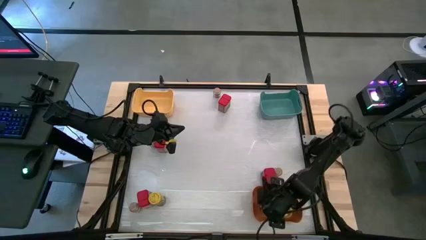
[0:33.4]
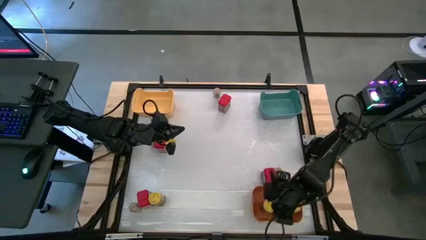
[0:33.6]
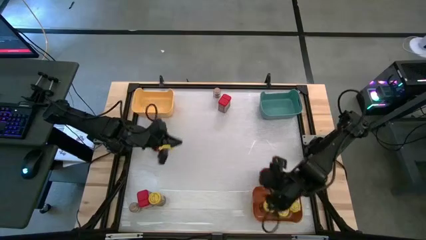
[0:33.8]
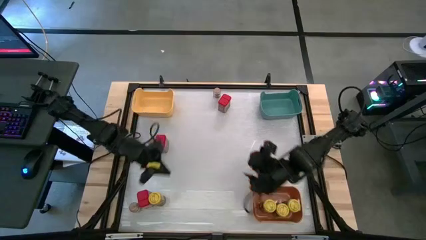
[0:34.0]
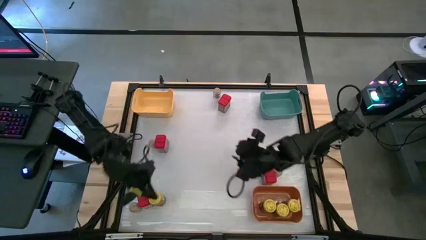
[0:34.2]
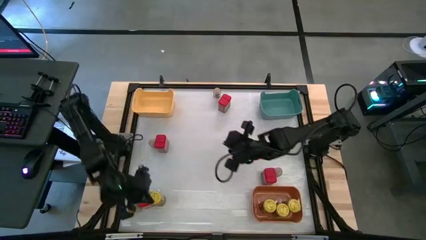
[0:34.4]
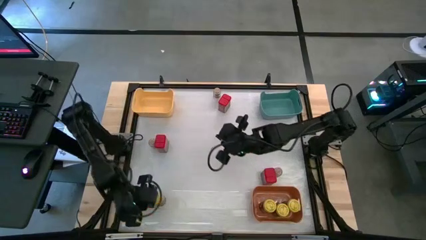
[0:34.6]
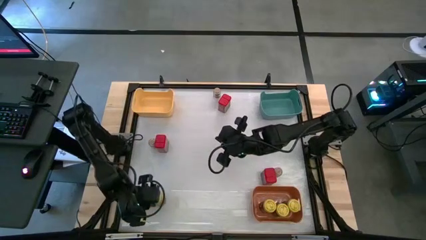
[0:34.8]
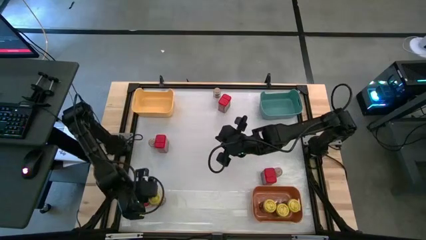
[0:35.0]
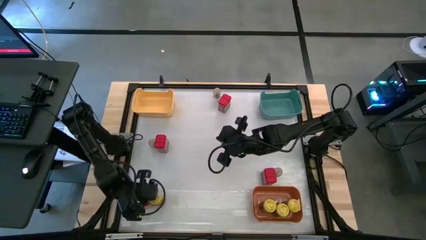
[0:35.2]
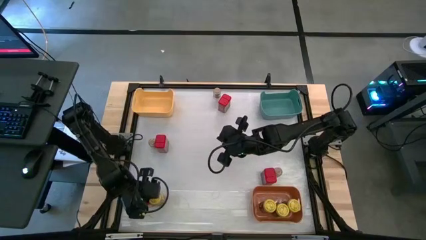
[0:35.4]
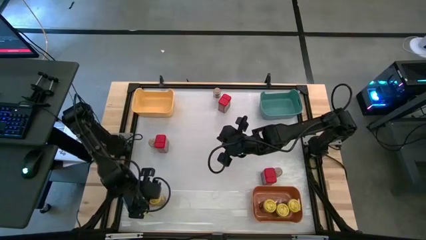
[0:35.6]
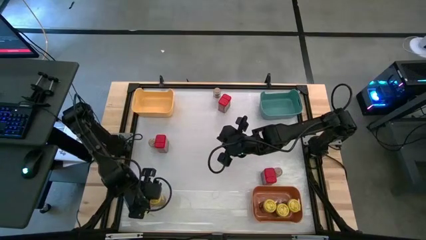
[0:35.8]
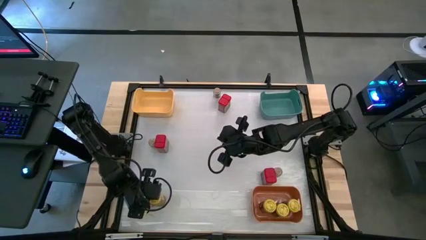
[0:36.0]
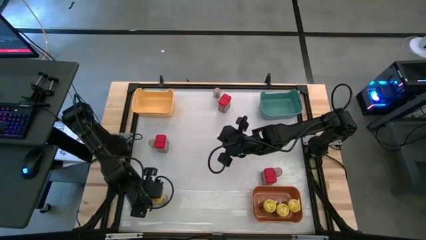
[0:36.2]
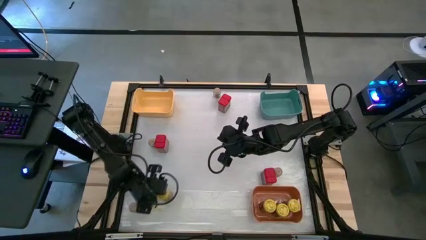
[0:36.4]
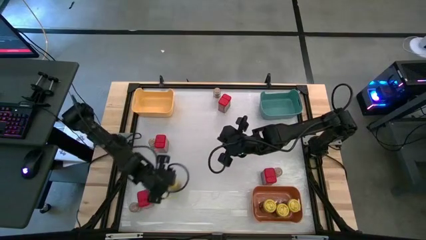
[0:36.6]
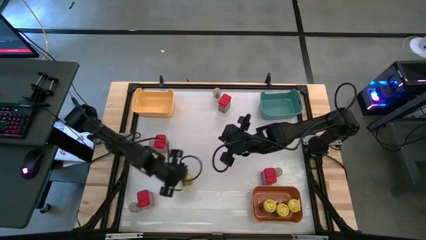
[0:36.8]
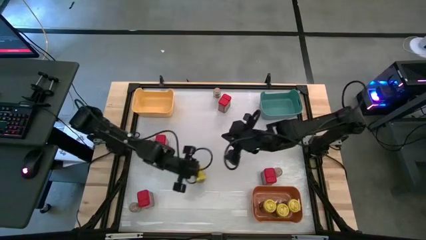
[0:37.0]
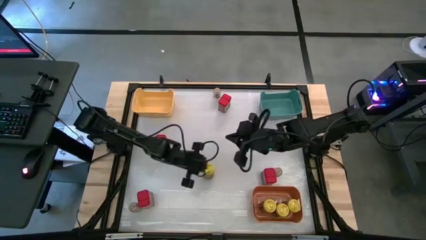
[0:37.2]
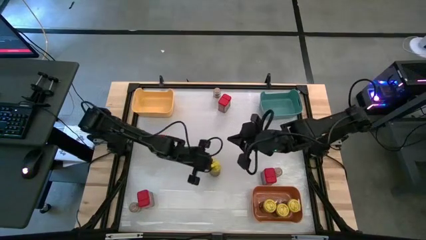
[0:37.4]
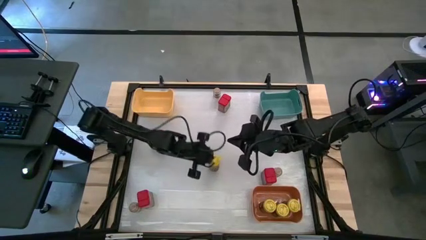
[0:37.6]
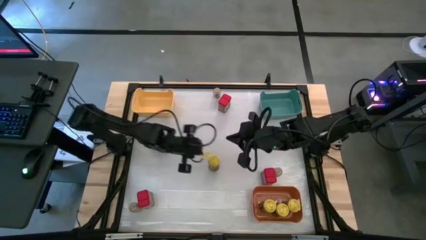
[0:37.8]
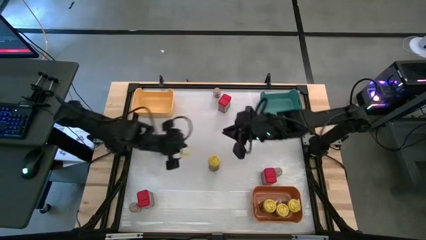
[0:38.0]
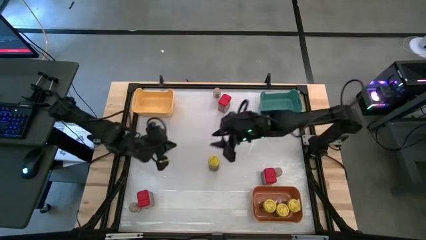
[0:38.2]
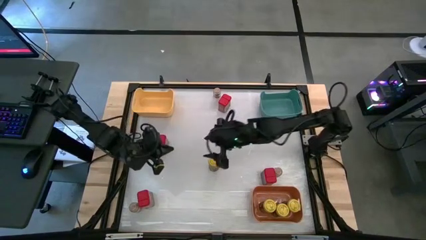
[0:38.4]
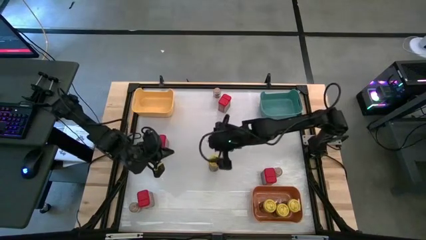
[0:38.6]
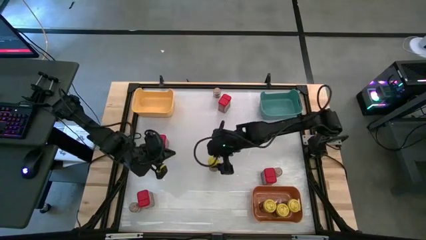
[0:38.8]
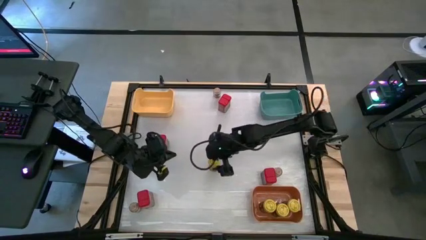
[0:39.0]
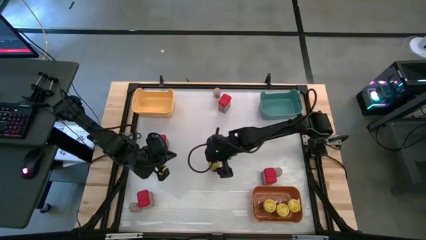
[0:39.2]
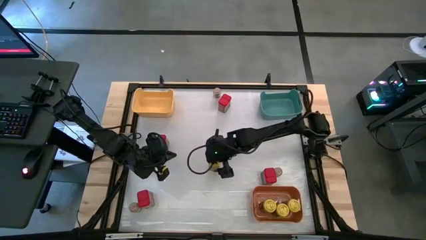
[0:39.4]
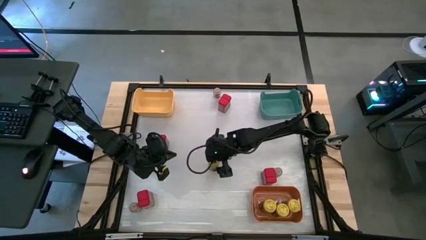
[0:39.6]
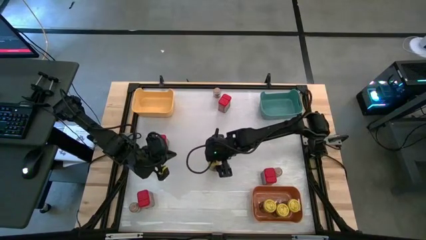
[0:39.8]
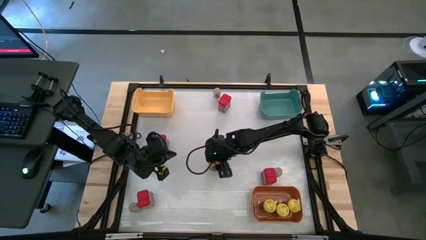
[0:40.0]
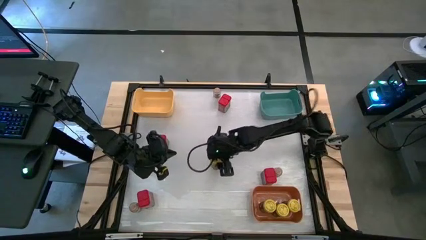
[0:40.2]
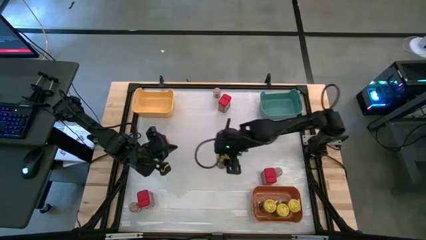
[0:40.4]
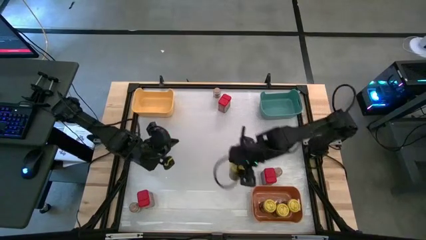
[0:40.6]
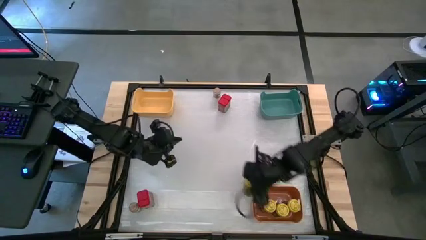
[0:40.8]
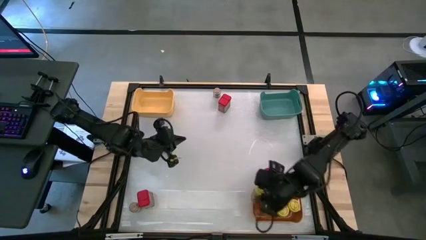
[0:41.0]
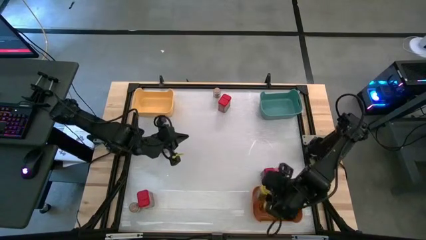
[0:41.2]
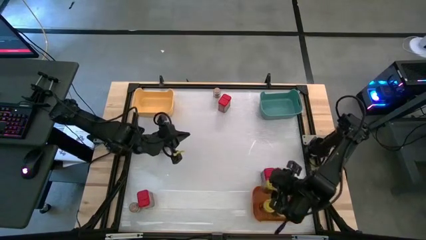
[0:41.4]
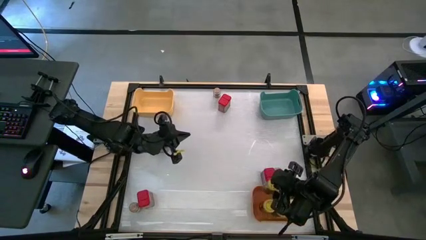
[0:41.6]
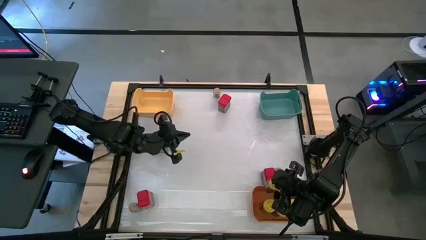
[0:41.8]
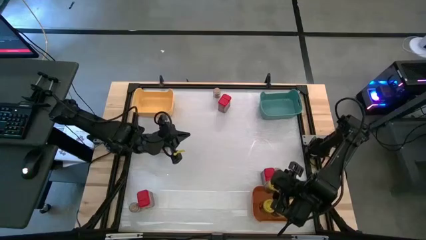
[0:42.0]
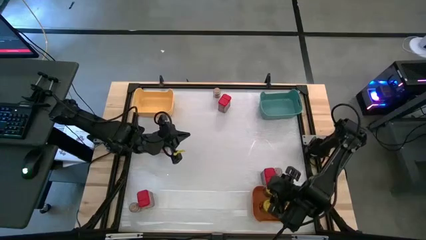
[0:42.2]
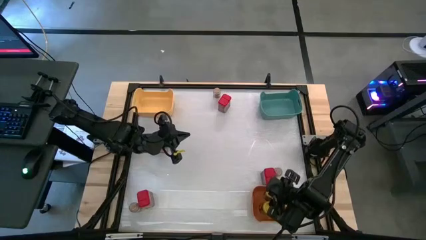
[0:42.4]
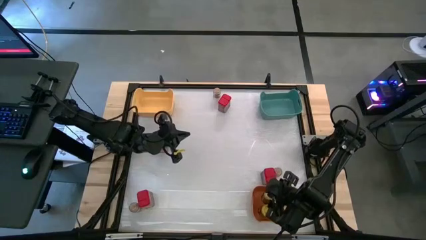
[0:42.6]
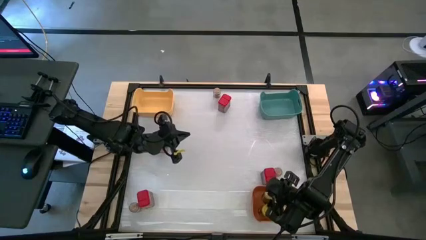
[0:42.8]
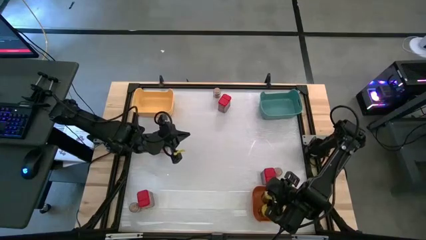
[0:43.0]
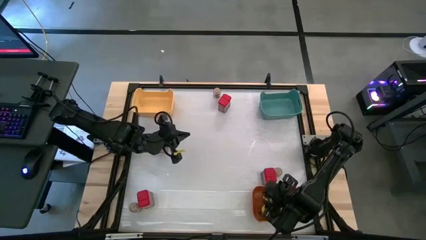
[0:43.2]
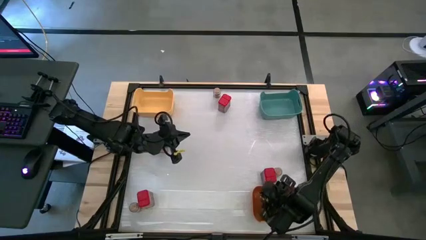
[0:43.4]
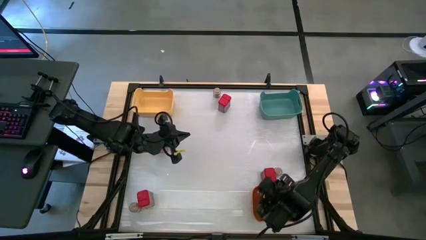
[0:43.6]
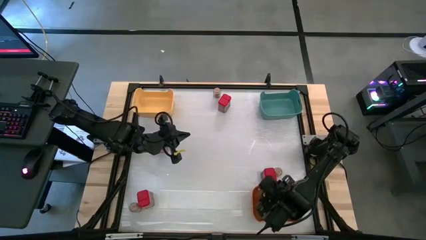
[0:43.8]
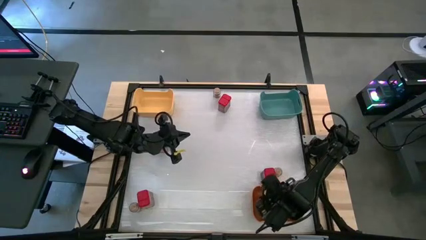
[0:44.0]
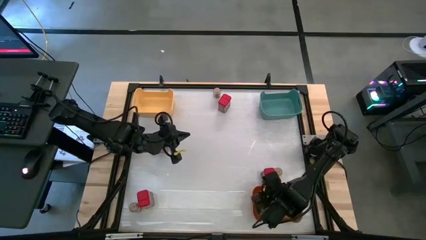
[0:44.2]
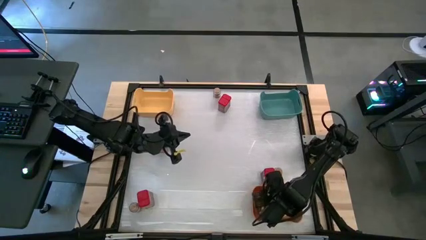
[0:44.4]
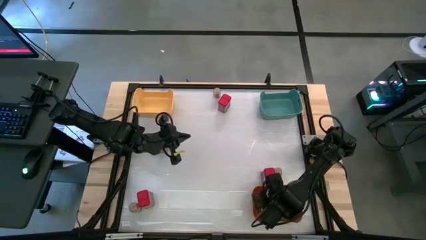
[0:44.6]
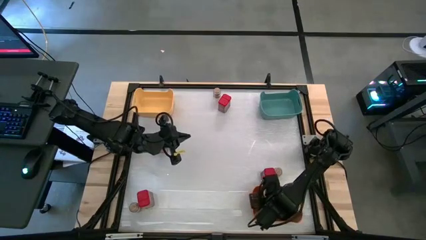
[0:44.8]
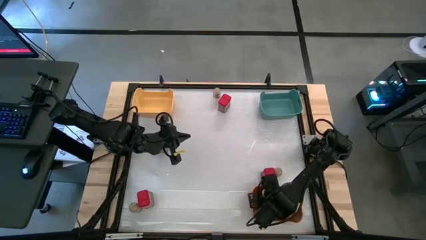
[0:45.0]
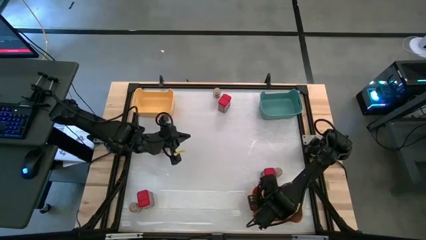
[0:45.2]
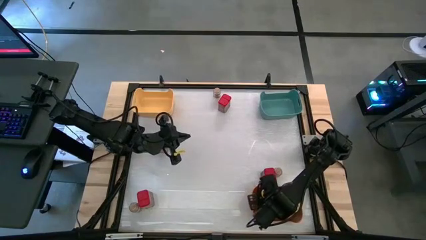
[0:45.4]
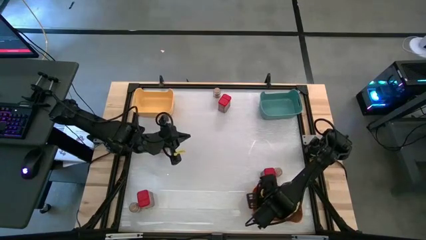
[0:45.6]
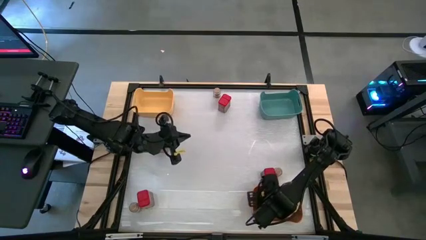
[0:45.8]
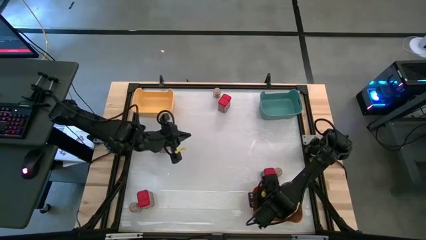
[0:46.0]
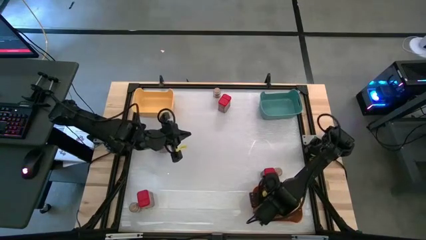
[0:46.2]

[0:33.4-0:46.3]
Task: Sort spices by type
Put the yellow seasoning bottle into the orange bin

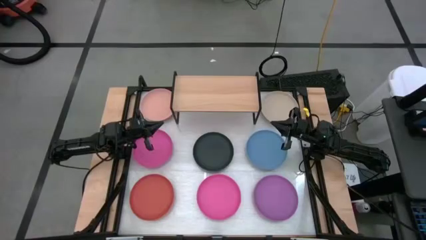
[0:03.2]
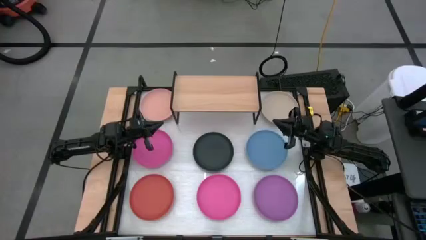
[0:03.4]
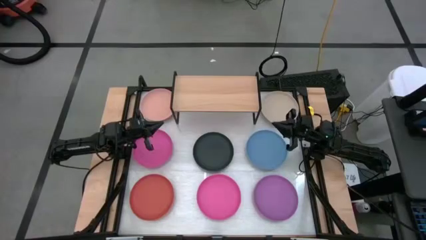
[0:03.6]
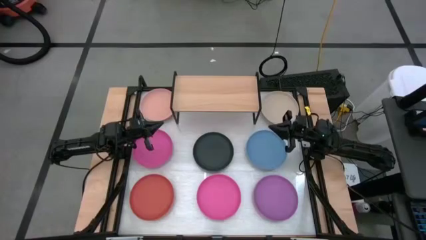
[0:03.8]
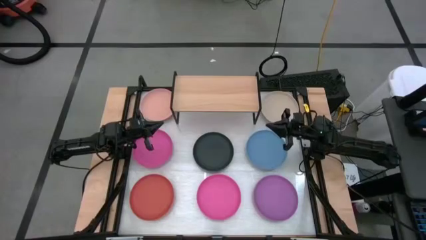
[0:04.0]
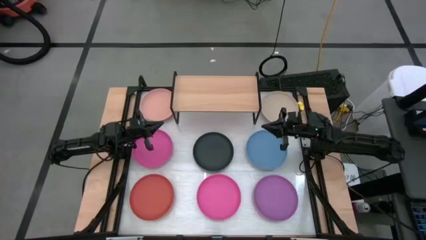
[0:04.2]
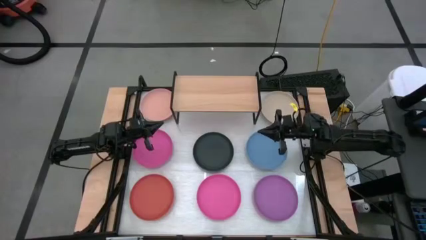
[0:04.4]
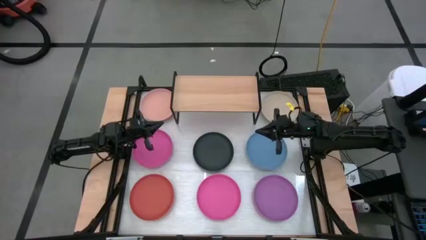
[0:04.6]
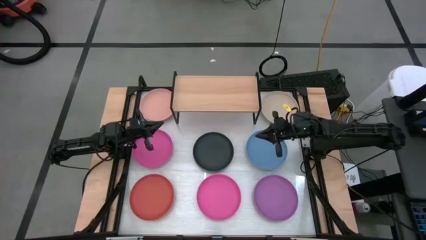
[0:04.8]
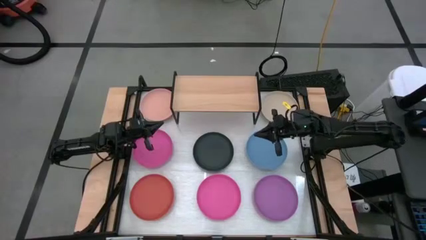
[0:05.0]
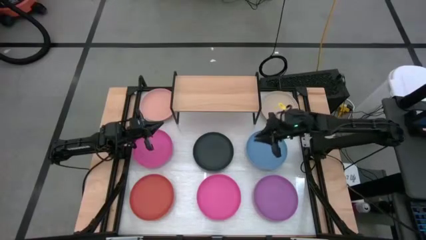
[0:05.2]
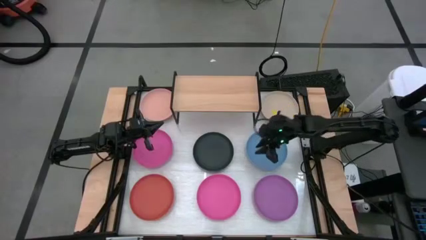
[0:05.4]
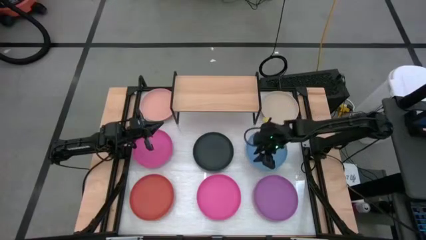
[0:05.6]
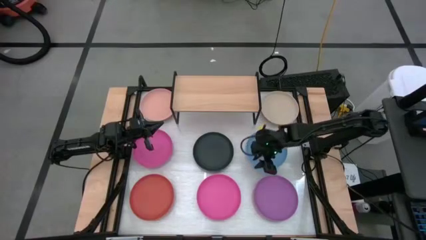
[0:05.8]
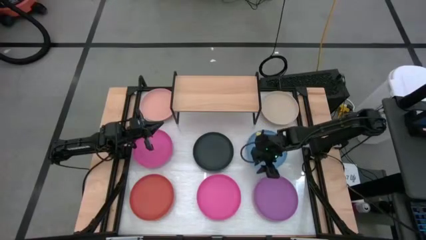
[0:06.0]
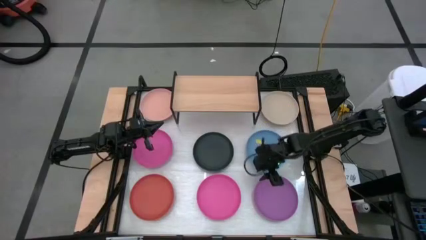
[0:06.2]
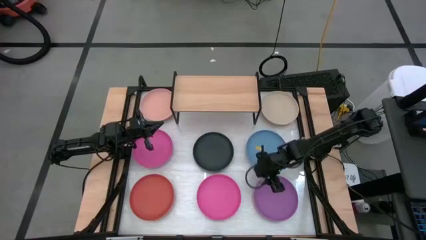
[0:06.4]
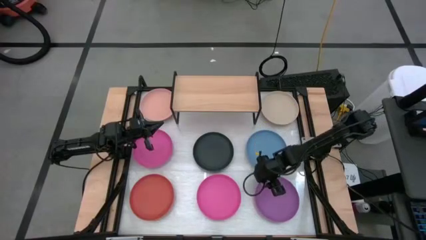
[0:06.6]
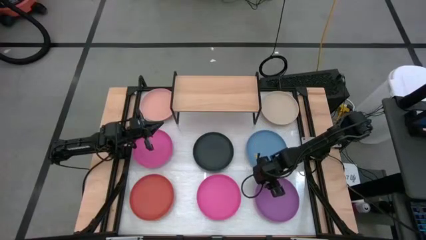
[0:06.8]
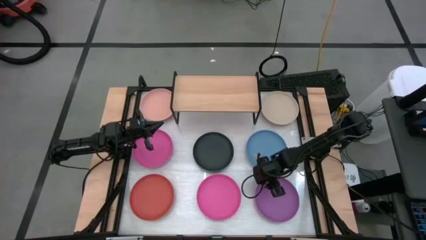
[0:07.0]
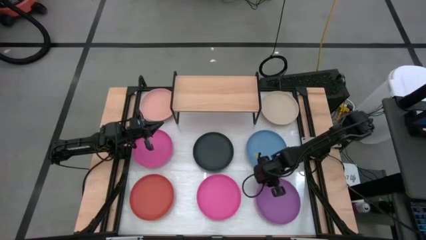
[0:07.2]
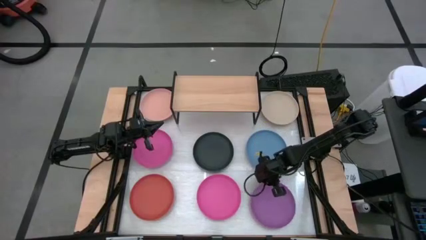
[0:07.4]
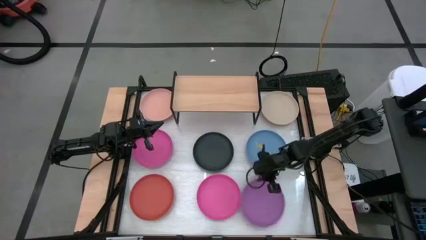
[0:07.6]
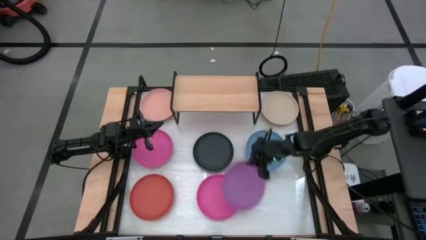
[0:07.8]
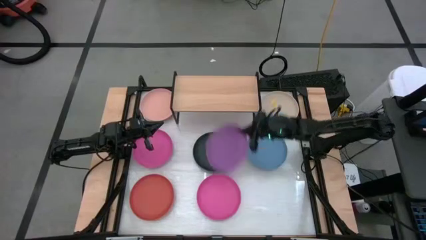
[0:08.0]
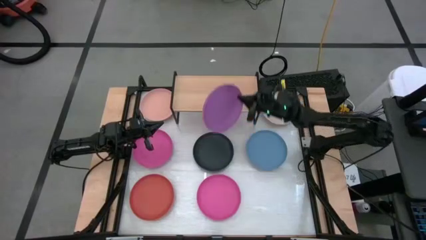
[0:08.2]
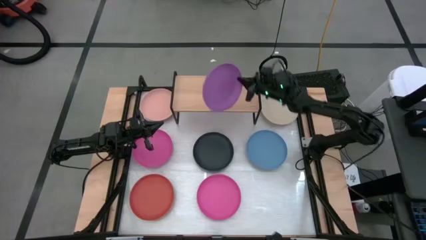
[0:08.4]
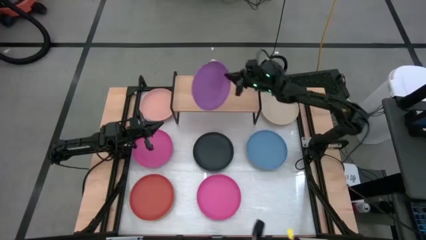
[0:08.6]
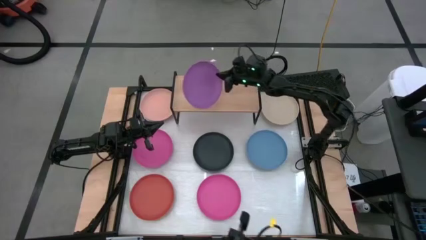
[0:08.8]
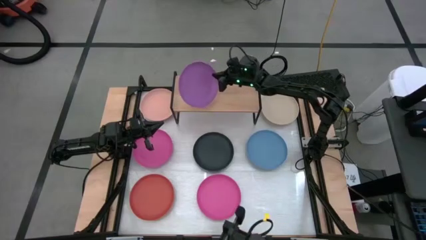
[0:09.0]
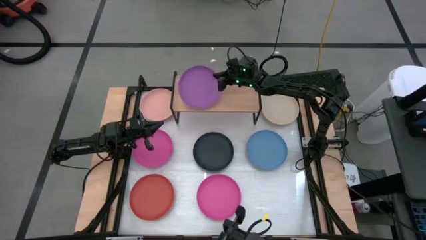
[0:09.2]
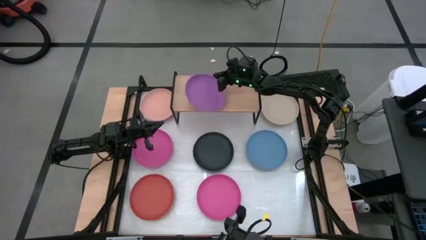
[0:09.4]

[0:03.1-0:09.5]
Task: Place and stack plates onto a shelf
Put the violet plate on the shelf
